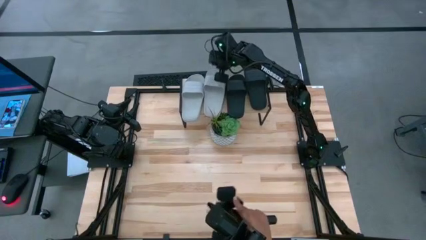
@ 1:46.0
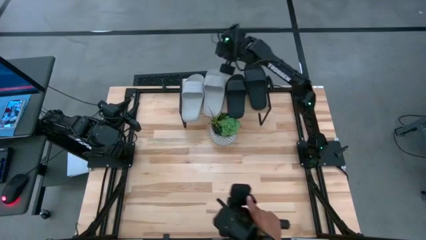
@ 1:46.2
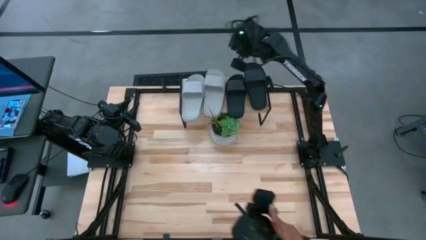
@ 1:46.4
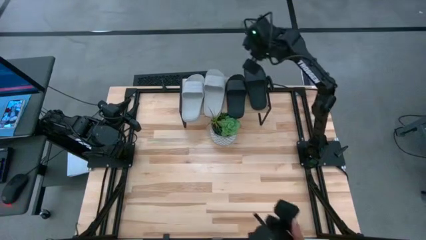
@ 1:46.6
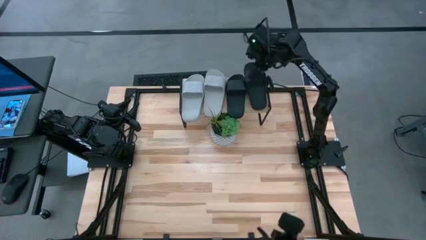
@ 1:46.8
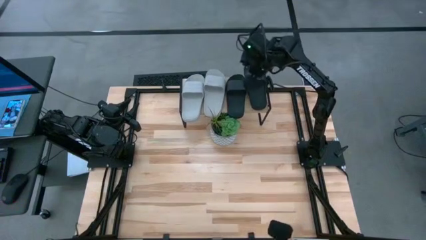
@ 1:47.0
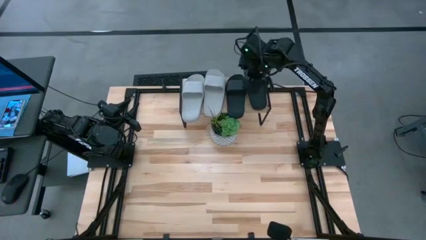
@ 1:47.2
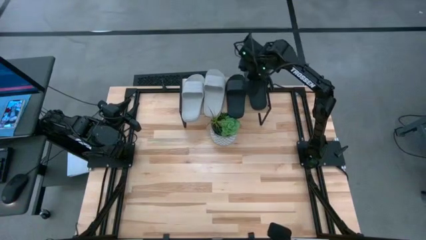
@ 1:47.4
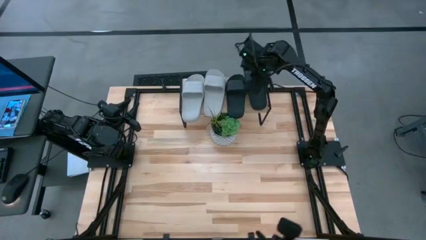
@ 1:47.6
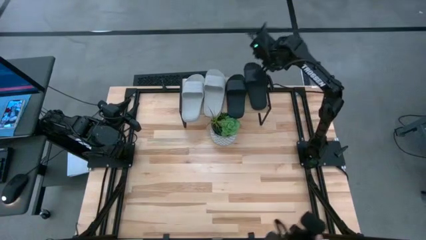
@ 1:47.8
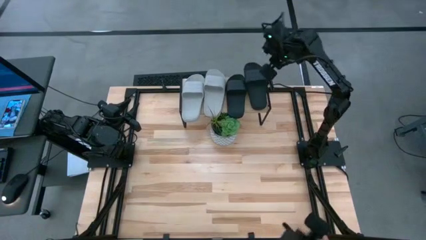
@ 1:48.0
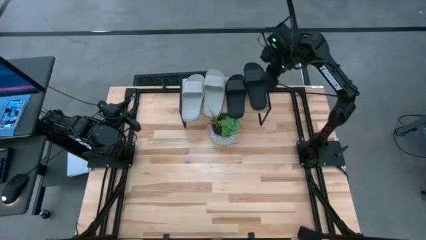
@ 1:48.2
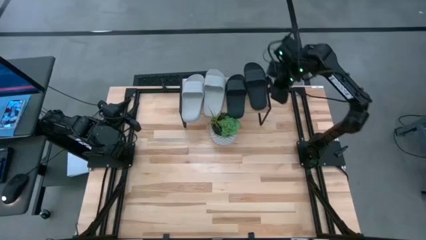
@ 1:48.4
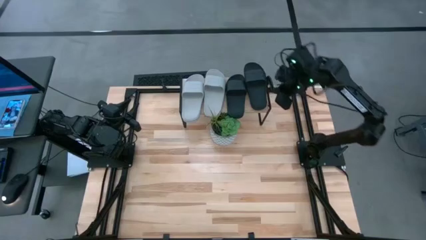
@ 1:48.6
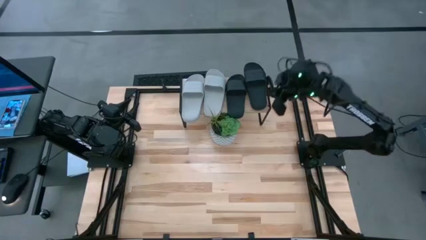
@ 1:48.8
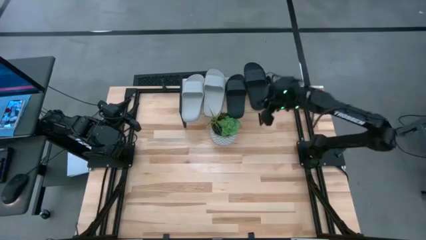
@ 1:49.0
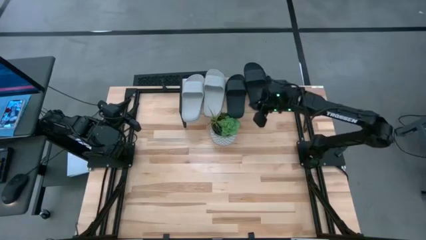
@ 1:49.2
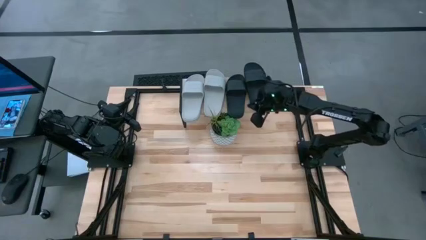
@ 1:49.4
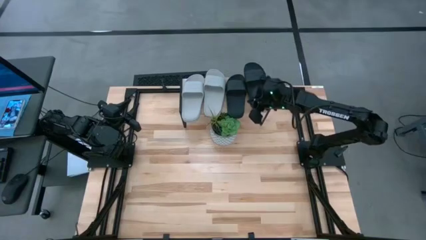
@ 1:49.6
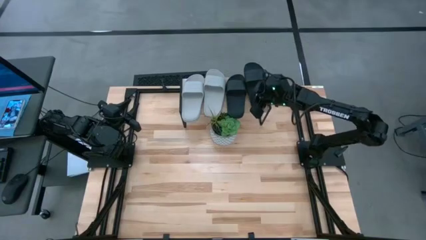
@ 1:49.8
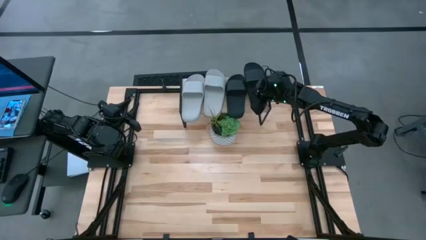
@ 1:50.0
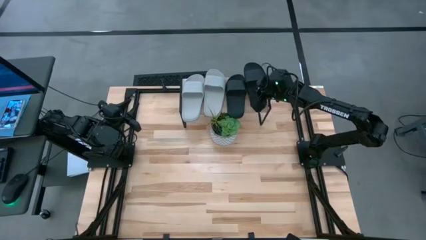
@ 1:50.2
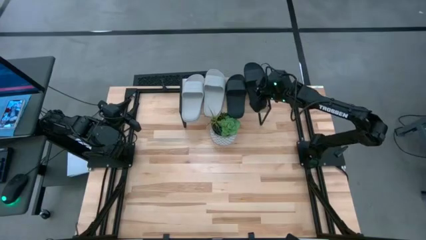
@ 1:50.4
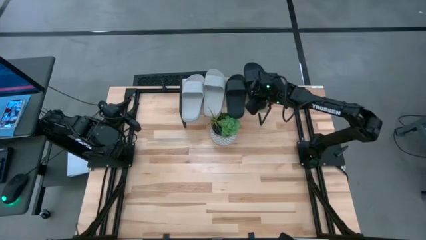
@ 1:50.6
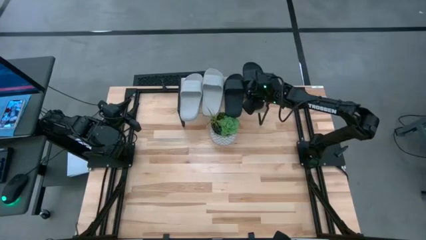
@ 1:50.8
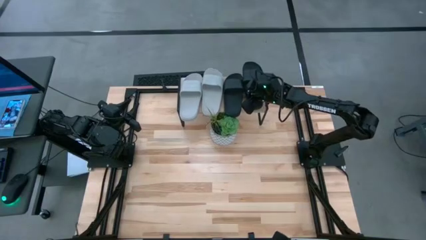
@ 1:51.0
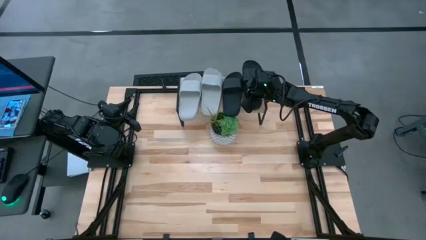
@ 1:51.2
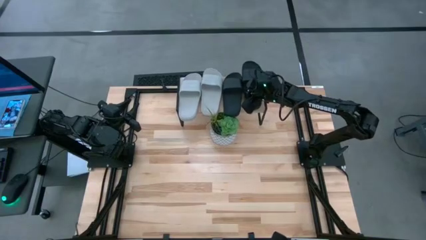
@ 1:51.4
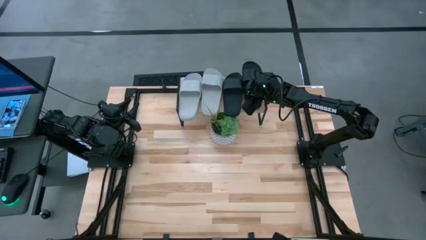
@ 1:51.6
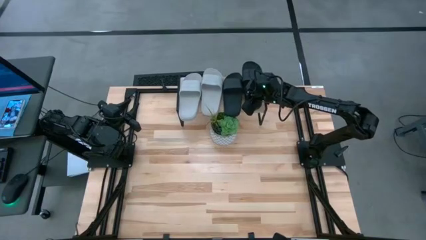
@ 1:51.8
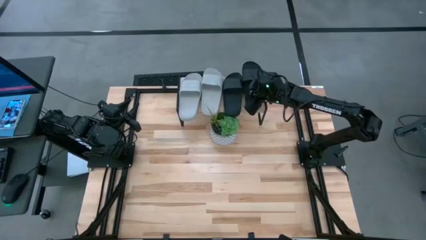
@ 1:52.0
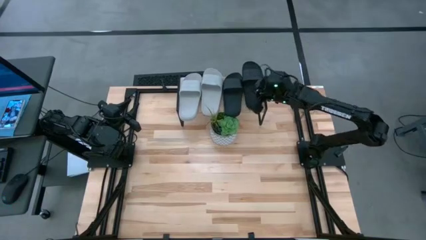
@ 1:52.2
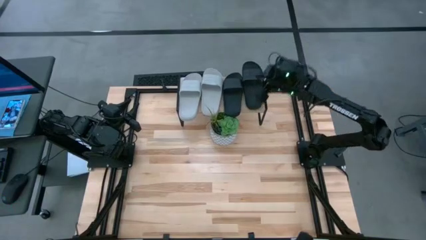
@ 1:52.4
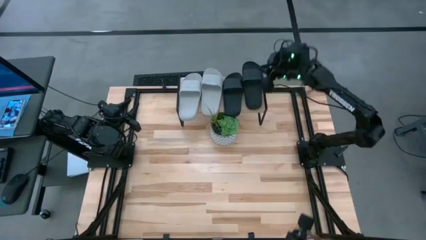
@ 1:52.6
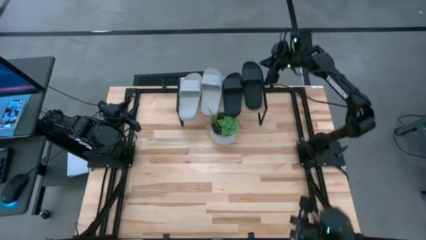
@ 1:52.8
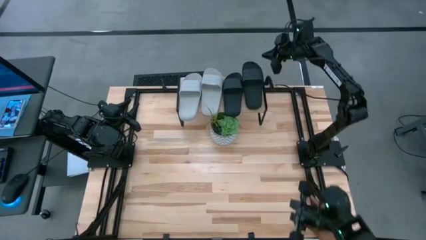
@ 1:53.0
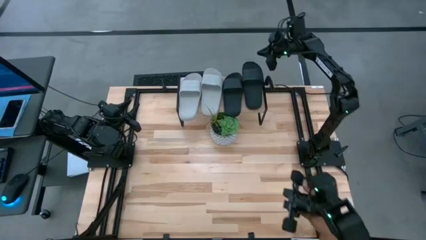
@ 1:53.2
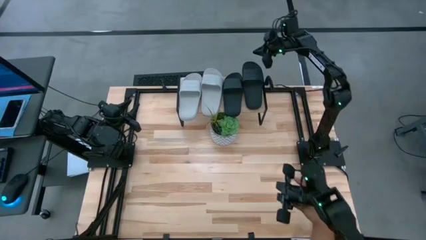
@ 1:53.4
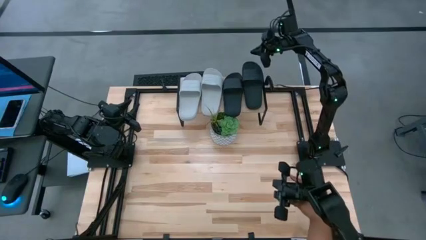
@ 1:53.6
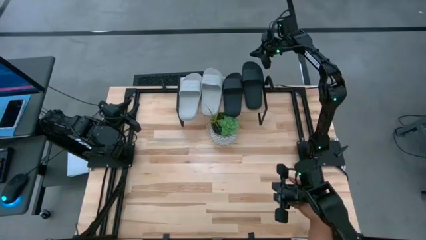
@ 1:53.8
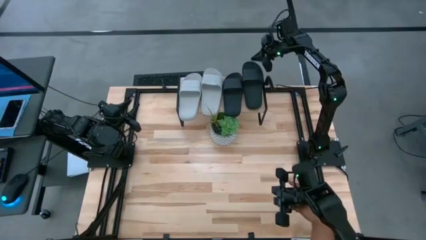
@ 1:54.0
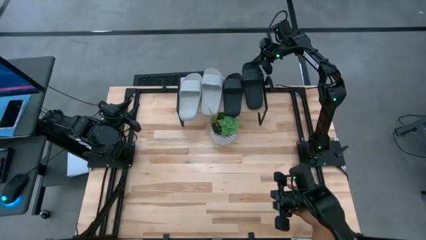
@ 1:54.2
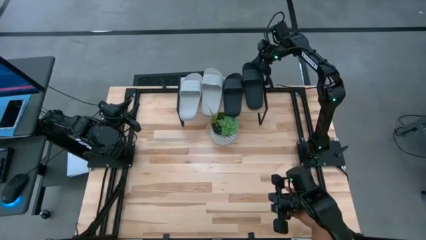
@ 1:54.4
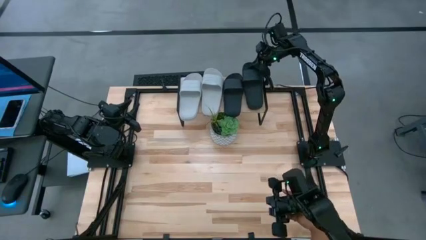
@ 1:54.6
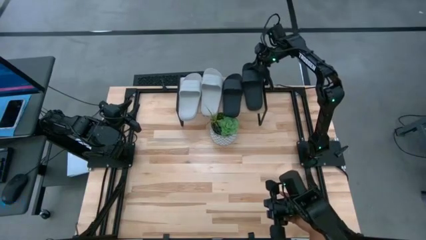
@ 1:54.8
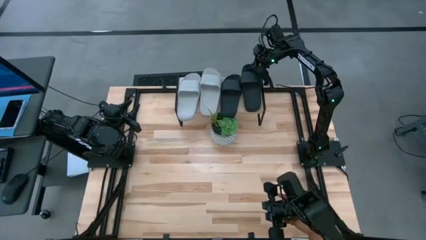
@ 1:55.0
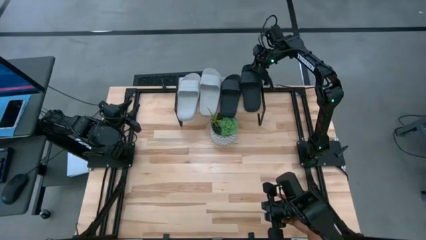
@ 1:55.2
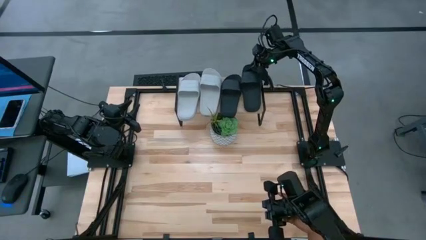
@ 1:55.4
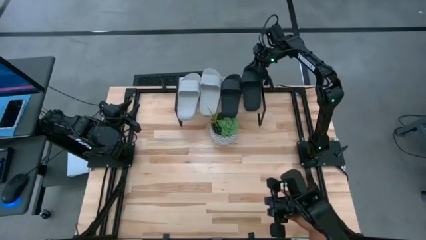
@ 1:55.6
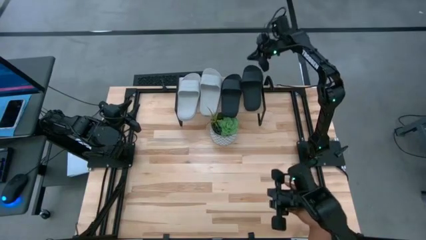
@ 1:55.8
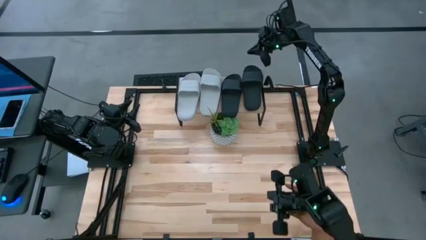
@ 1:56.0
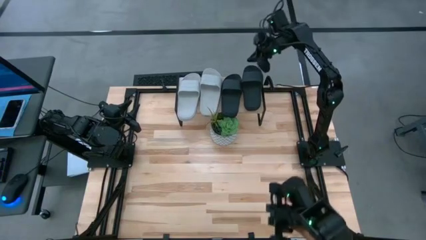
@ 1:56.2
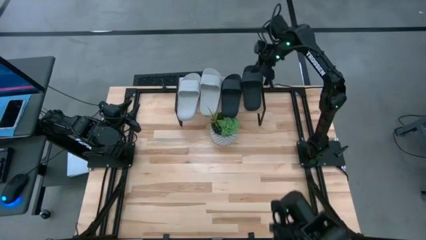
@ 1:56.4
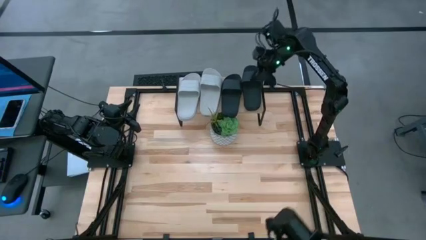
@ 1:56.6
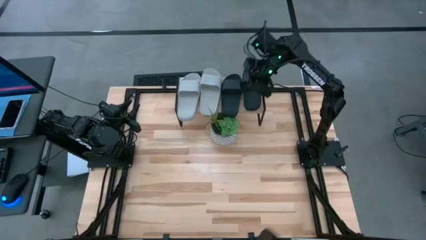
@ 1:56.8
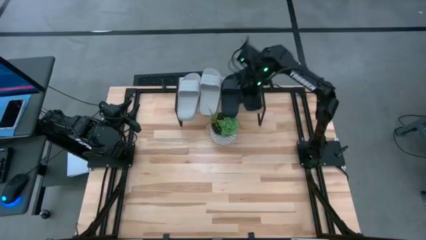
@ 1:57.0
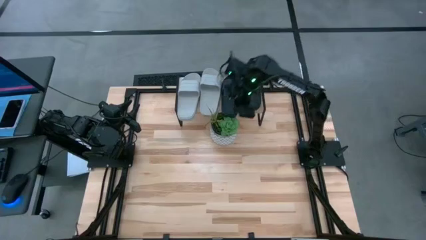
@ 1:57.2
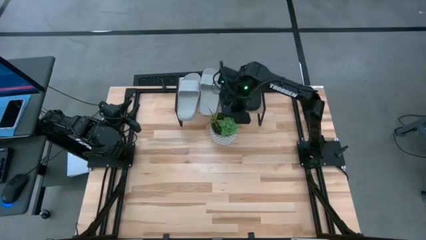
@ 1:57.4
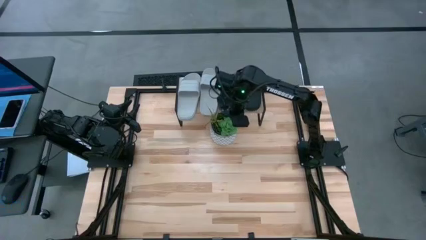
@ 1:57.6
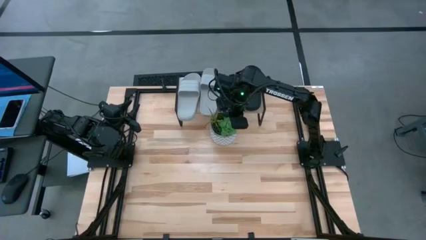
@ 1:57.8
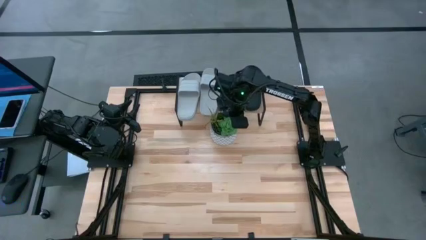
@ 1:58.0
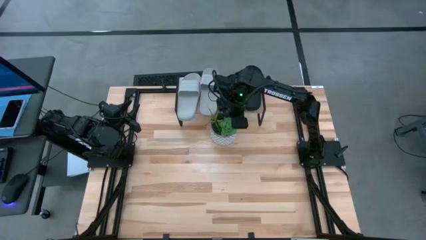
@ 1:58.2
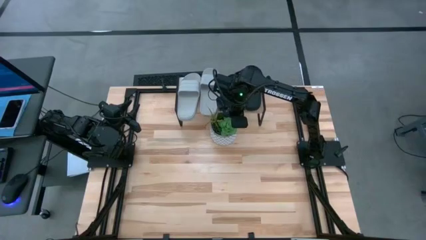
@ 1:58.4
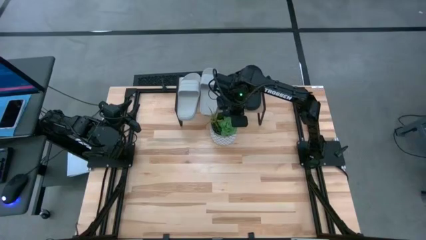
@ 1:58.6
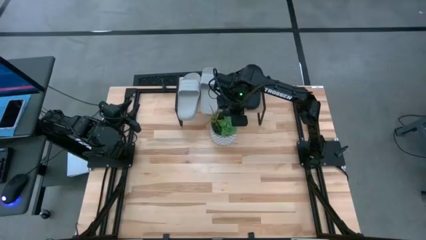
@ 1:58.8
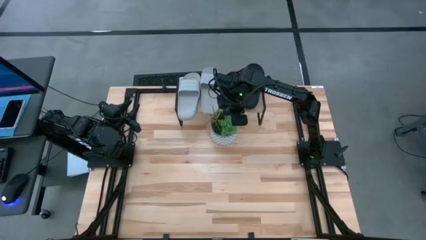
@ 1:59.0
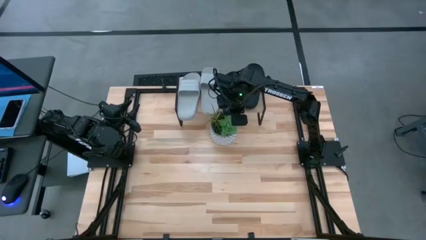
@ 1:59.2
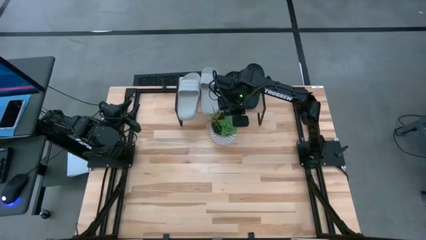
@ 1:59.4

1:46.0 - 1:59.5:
Task: Pick and place slides into the shelf
Adjust the slides on the shelf

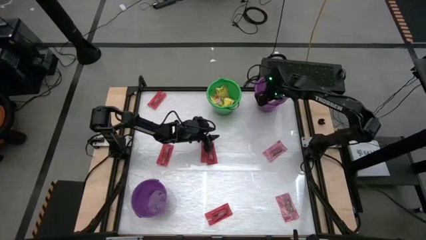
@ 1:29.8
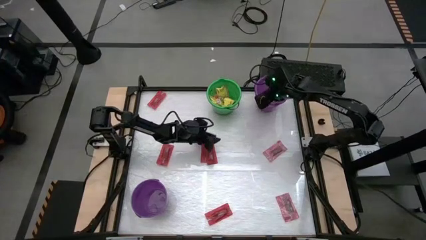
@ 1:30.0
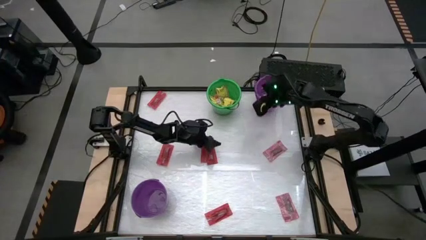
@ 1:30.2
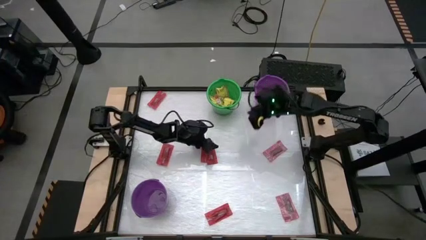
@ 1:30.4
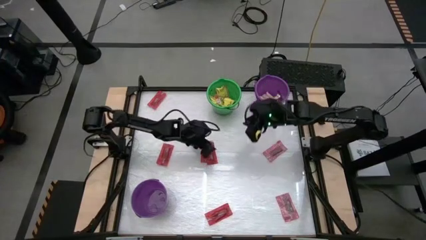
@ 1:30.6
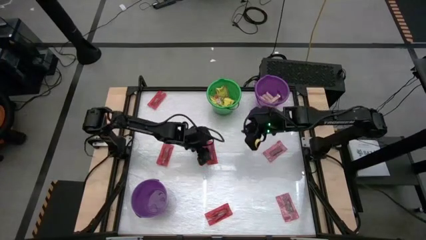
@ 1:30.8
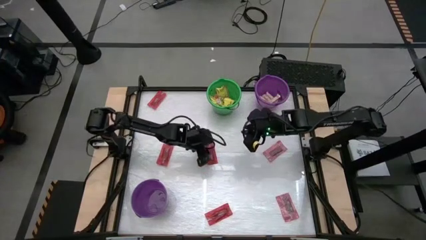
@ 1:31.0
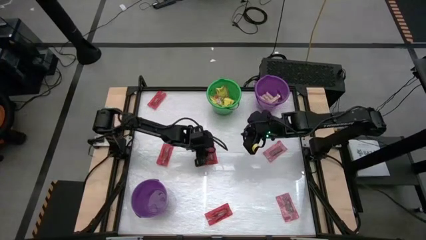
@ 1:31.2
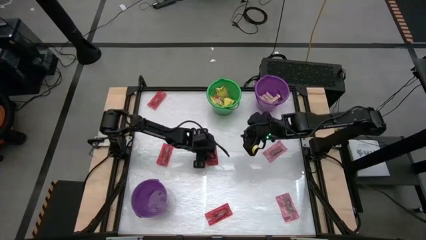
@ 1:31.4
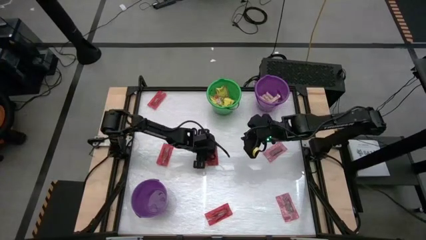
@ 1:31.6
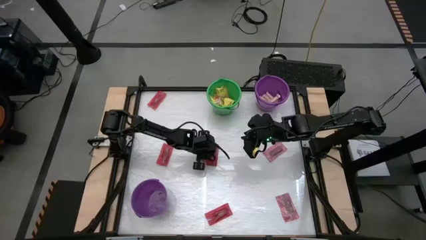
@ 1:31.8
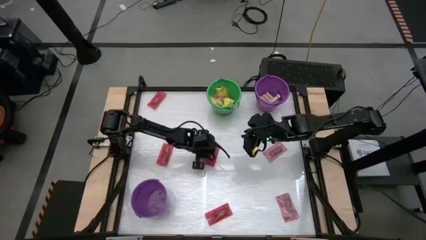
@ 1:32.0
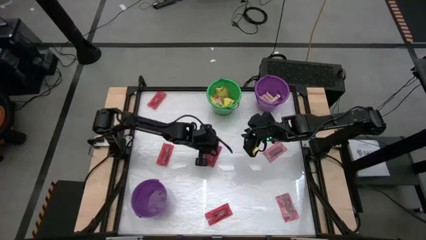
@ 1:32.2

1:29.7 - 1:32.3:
Task: Sort candy by brand, put in halloween buckets
Put the red candy into the bottom violet bucket

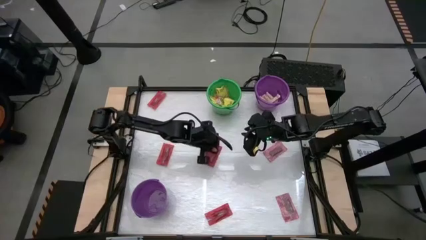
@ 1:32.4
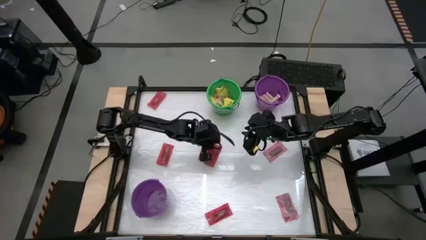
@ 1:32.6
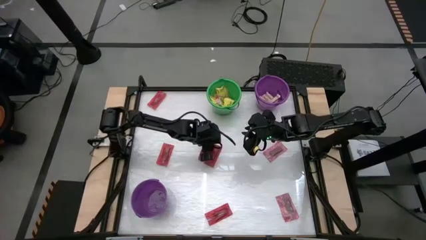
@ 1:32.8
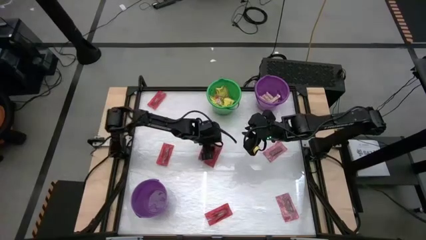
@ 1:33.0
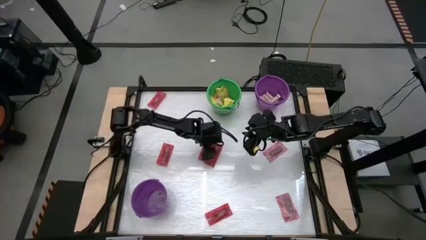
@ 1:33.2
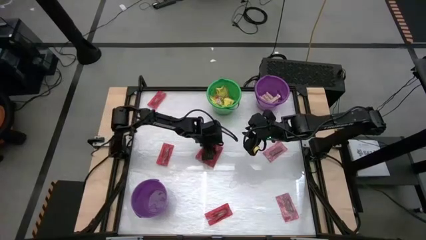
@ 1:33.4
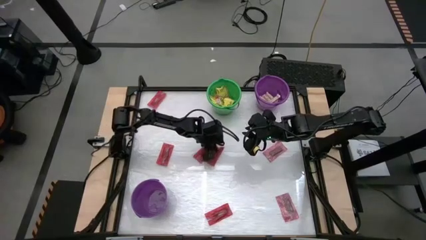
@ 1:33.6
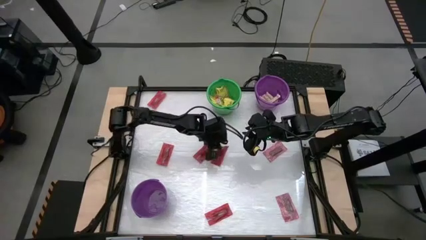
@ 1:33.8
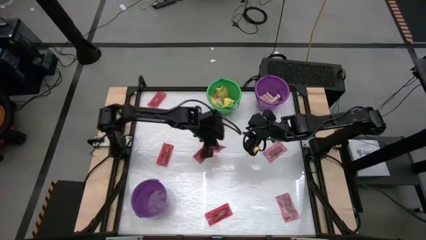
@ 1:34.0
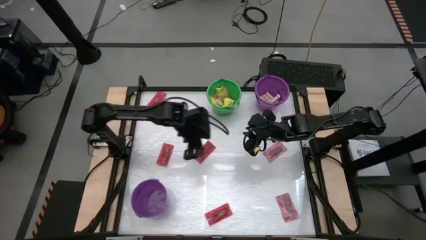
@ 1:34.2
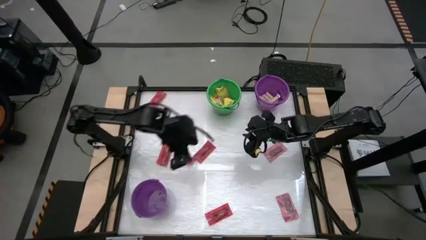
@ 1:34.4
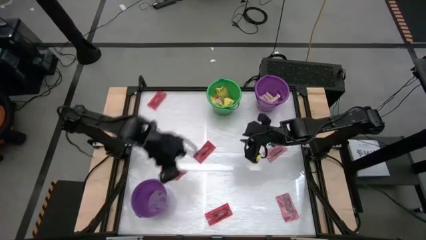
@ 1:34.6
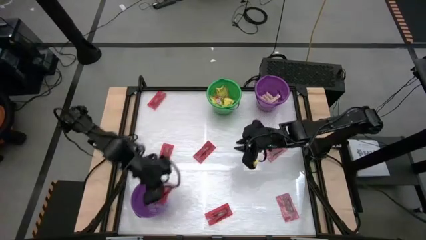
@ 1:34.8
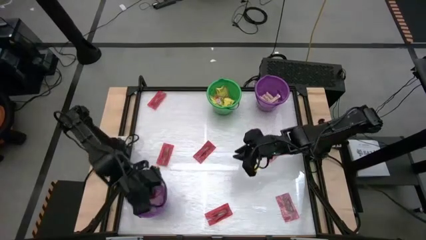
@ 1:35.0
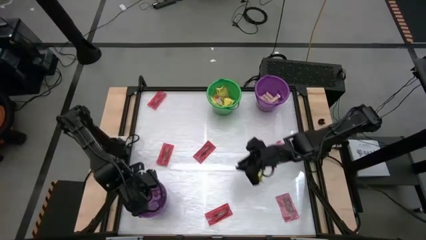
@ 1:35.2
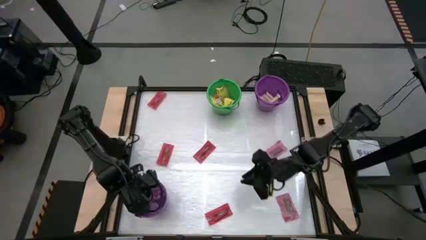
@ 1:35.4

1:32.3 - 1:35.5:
Put the red candy into the bottom violet bucket
